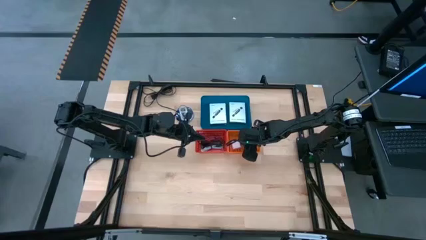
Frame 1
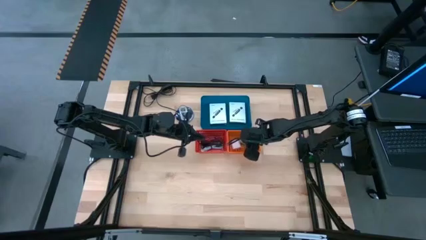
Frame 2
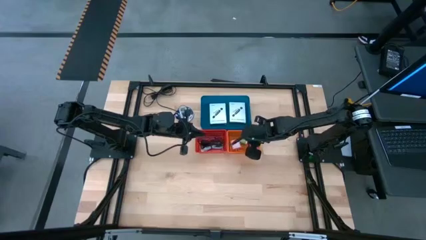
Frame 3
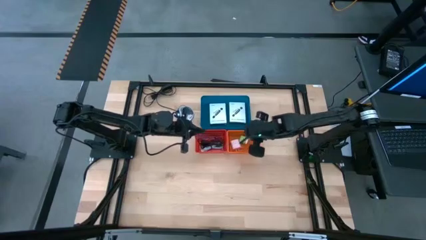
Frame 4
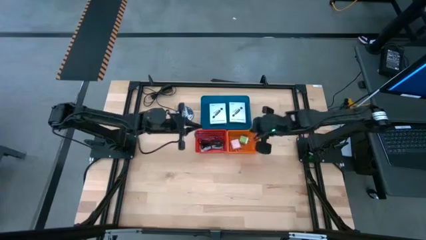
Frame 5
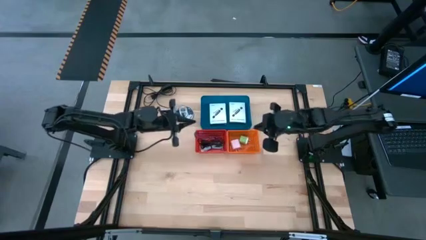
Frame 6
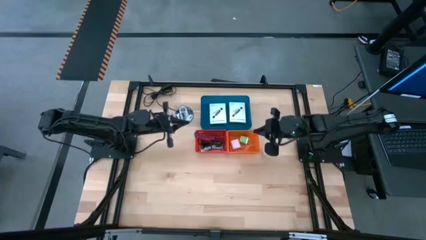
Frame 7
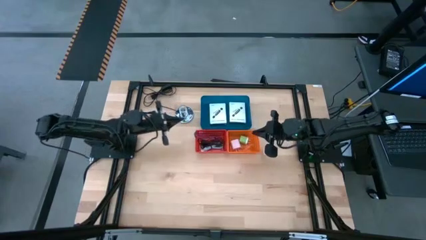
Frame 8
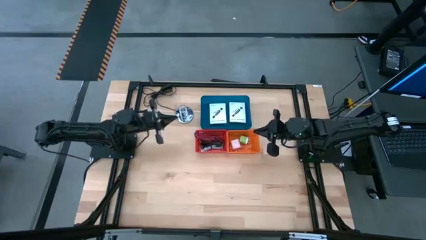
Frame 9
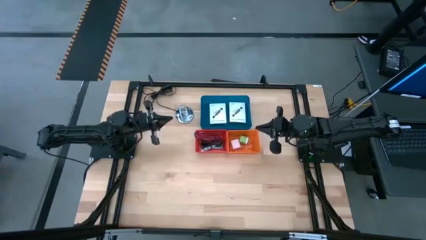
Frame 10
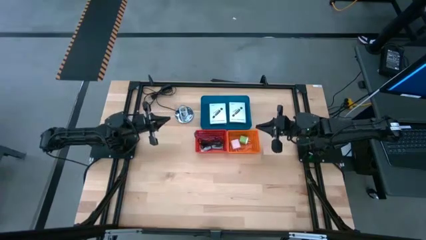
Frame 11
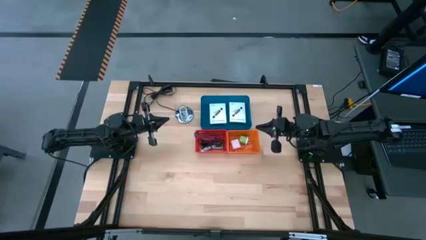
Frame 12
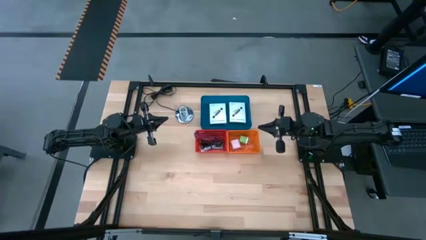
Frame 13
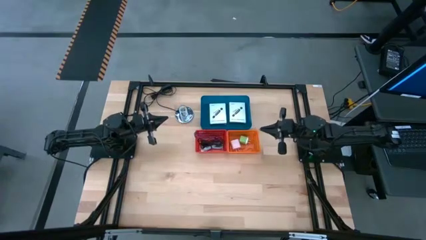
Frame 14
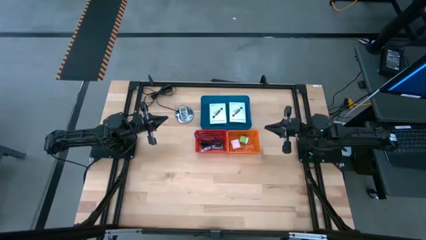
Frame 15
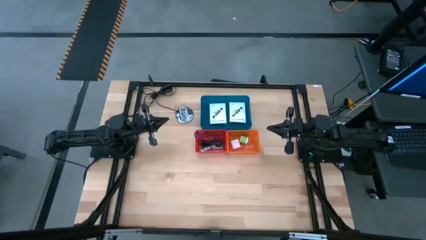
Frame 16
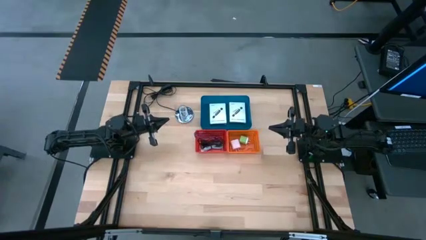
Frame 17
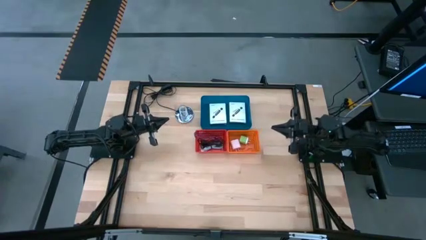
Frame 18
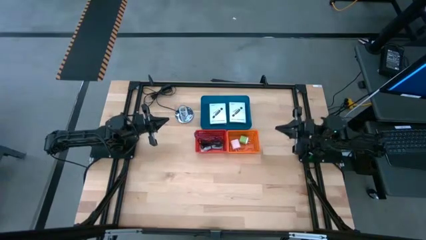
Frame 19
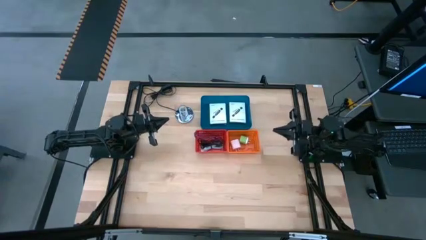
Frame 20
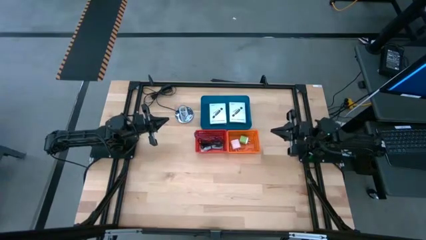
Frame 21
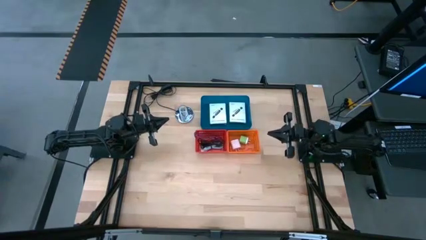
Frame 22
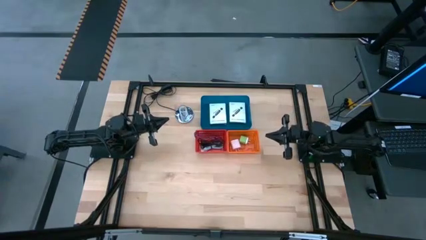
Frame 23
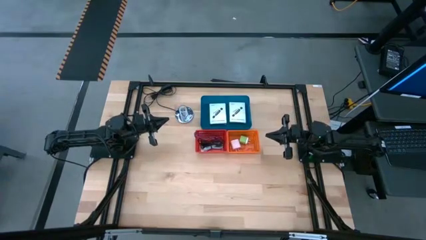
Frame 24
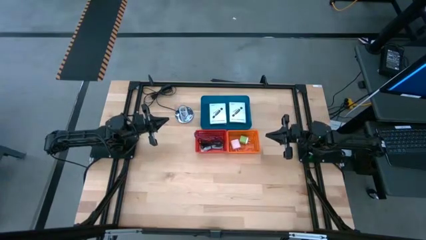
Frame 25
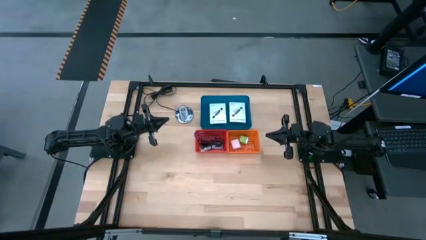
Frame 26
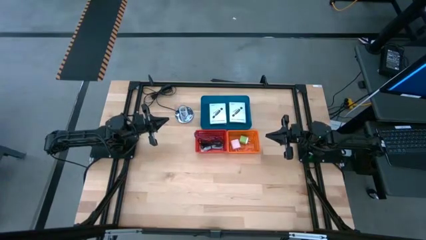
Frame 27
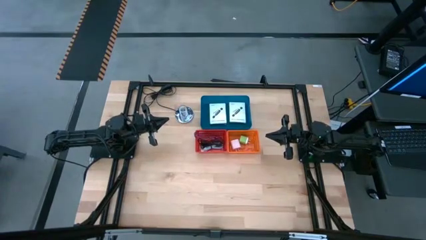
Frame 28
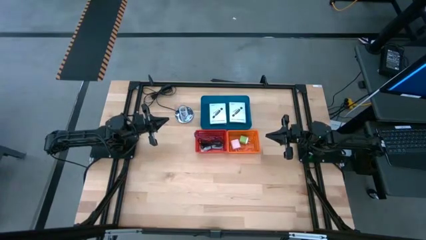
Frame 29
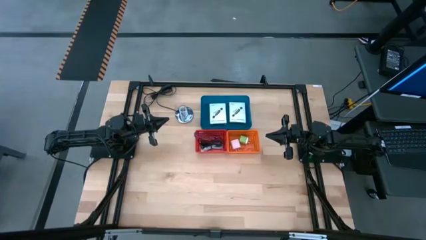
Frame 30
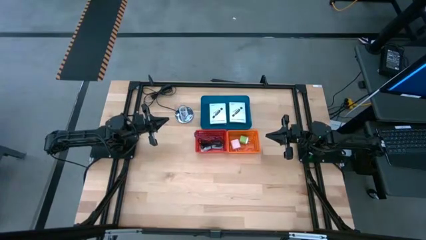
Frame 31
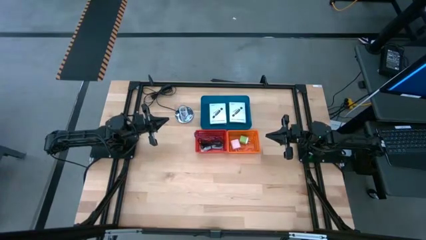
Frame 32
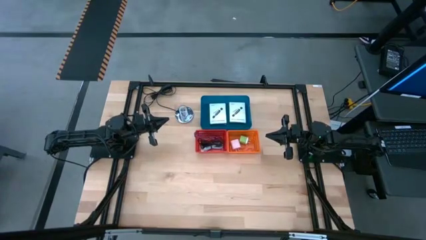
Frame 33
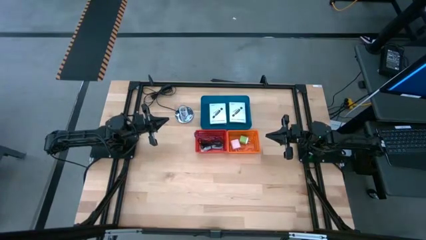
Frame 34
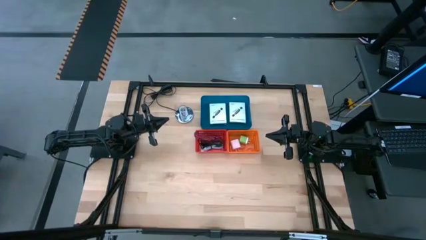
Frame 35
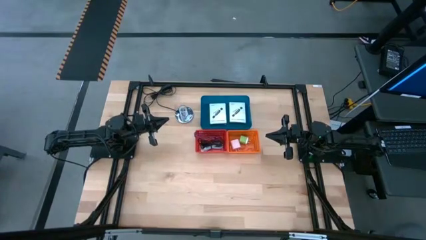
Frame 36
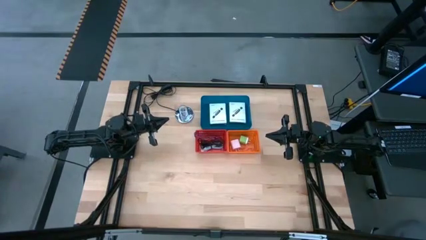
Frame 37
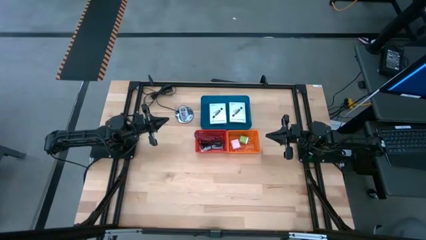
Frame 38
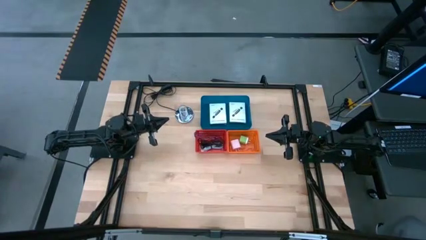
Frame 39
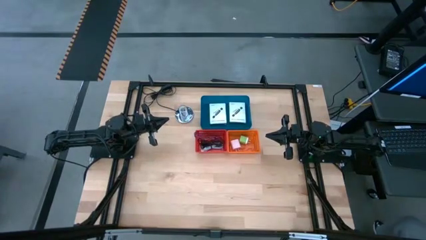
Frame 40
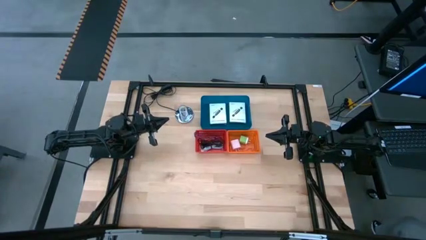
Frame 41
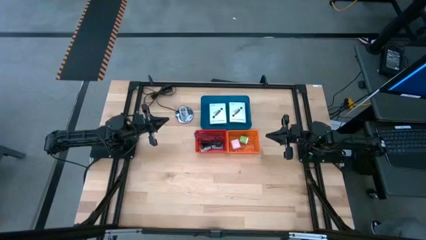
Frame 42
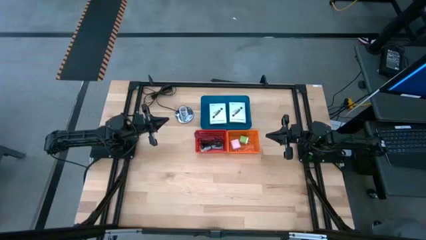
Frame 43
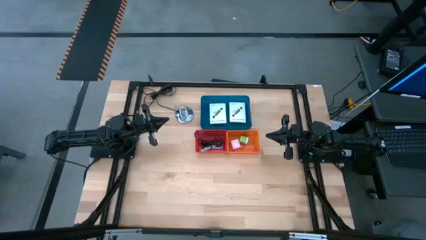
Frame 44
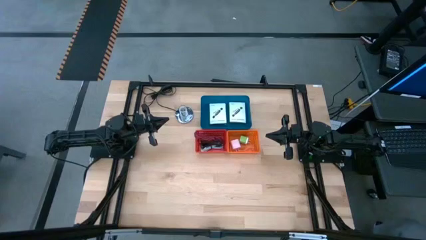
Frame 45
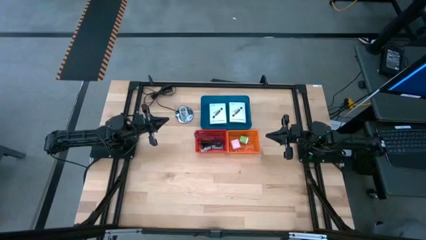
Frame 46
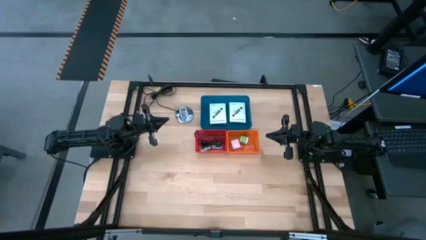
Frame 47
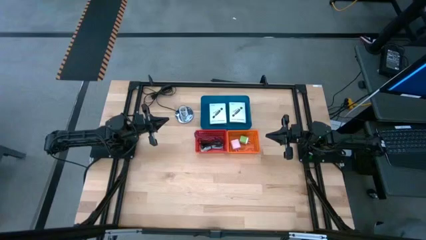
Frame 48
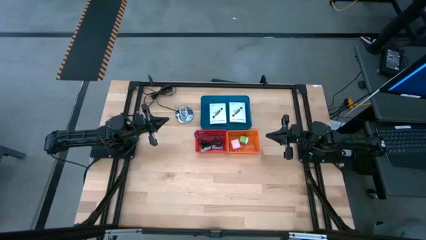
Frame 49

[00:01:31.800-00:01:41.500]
Task: Pick and place items into bin
Return to Home Position

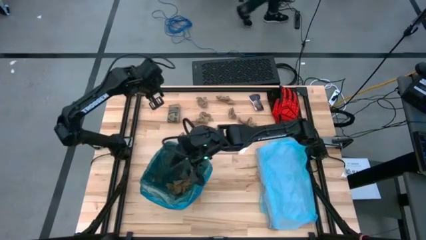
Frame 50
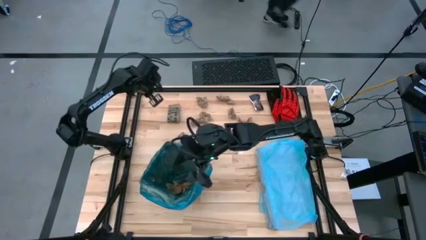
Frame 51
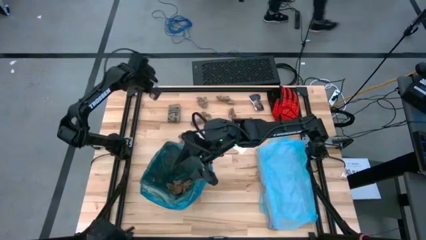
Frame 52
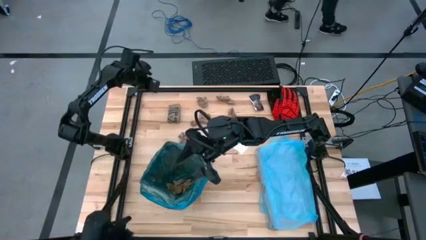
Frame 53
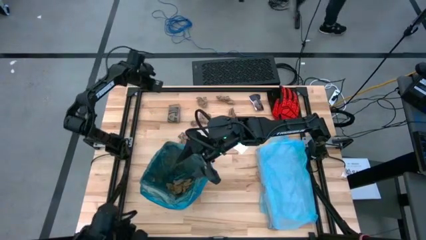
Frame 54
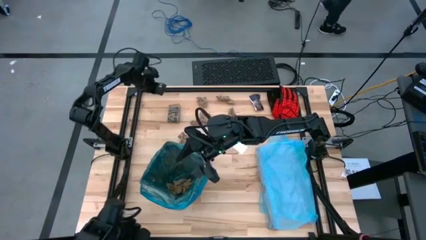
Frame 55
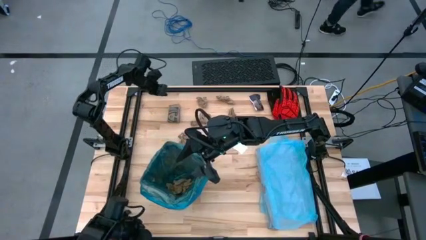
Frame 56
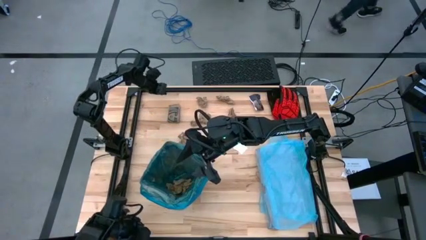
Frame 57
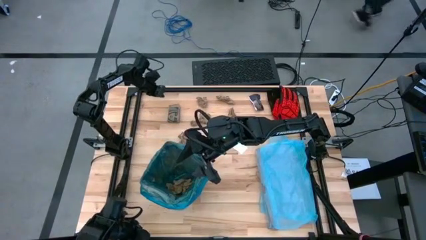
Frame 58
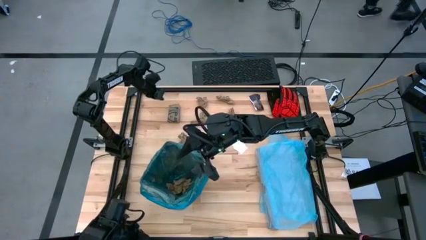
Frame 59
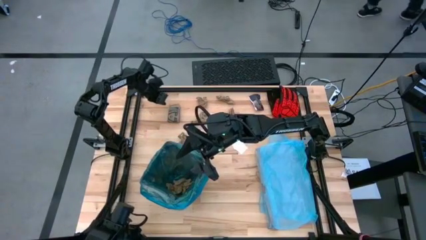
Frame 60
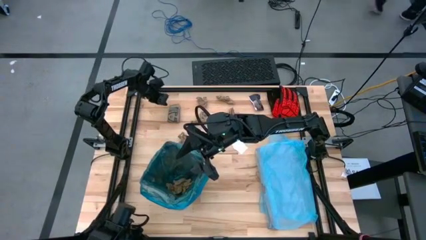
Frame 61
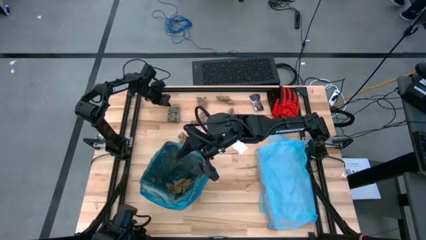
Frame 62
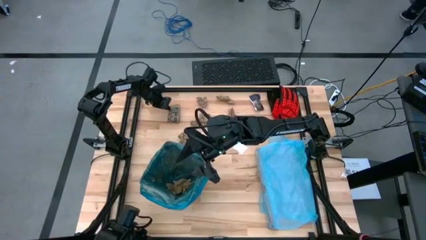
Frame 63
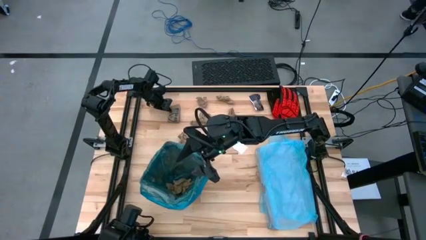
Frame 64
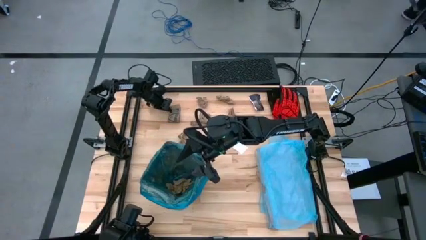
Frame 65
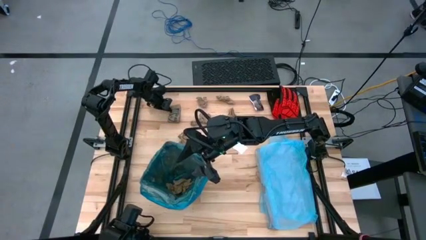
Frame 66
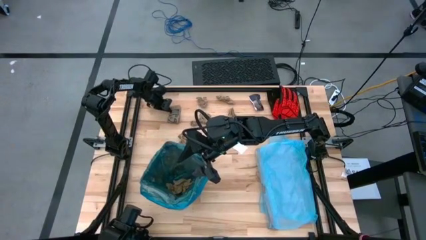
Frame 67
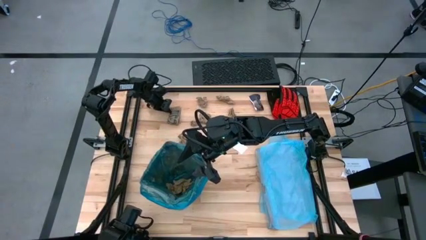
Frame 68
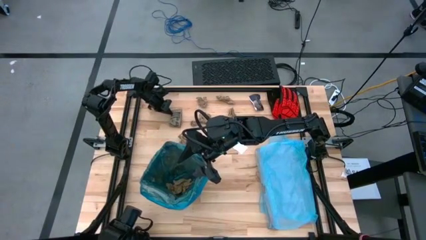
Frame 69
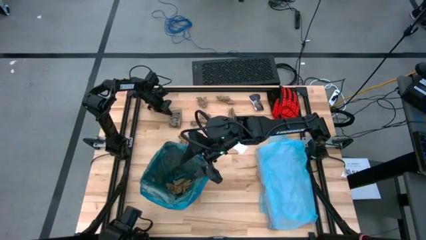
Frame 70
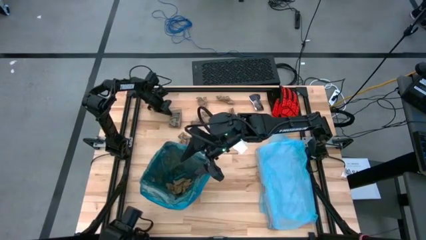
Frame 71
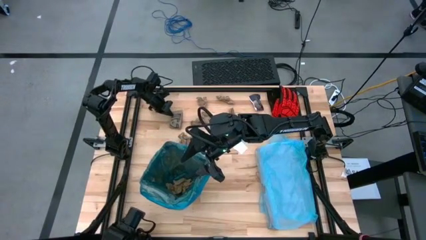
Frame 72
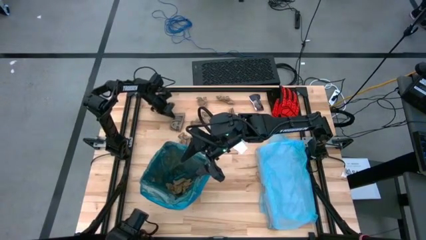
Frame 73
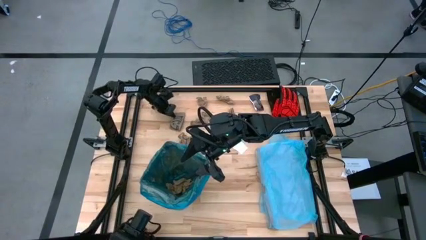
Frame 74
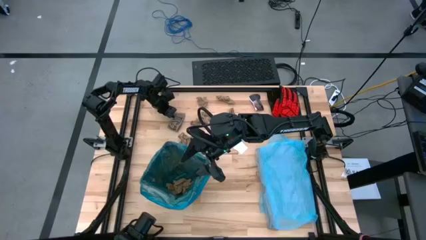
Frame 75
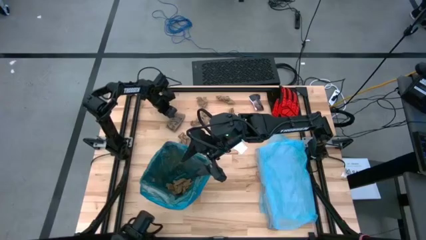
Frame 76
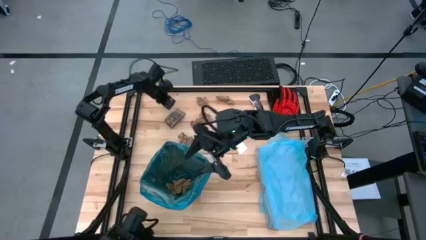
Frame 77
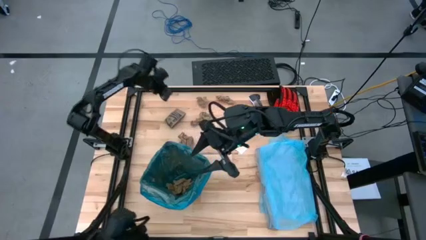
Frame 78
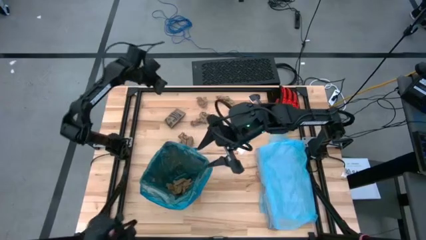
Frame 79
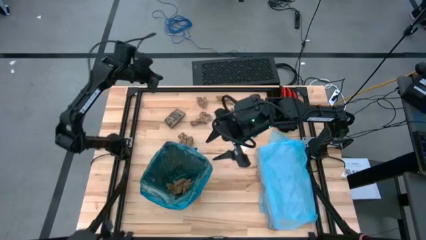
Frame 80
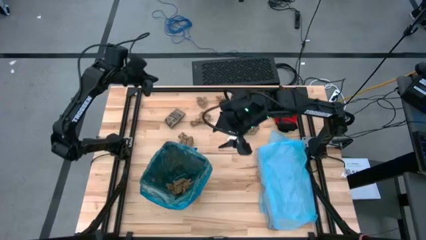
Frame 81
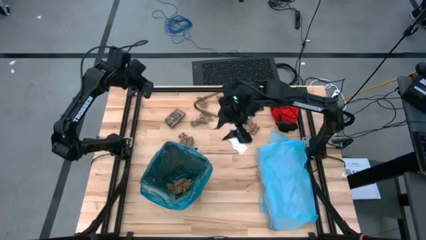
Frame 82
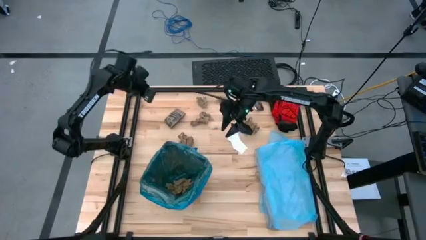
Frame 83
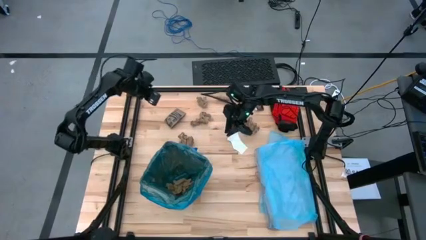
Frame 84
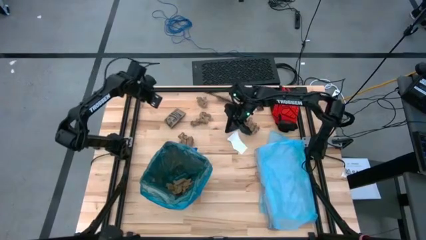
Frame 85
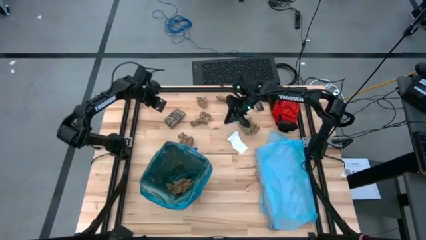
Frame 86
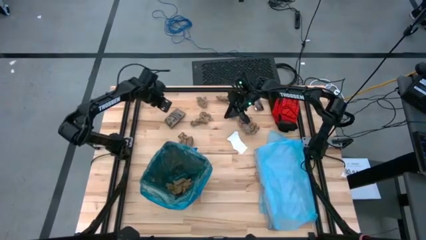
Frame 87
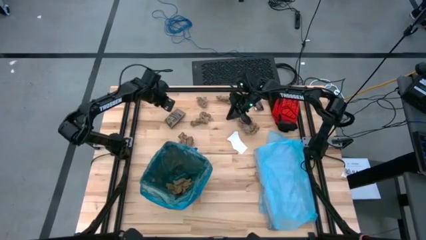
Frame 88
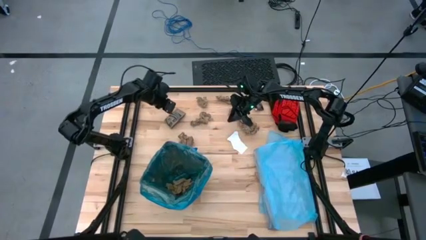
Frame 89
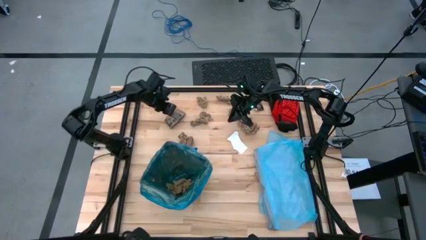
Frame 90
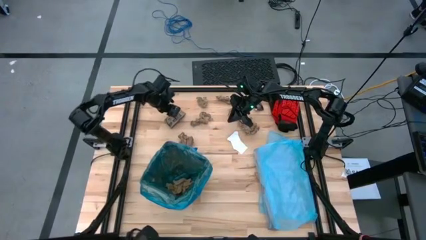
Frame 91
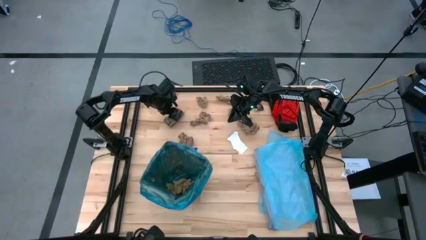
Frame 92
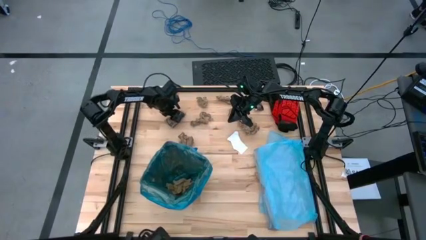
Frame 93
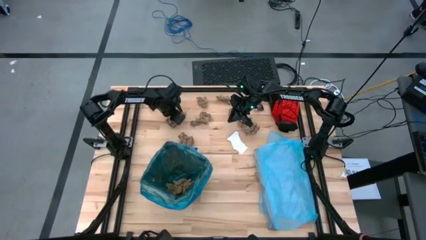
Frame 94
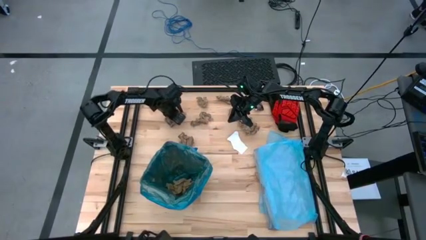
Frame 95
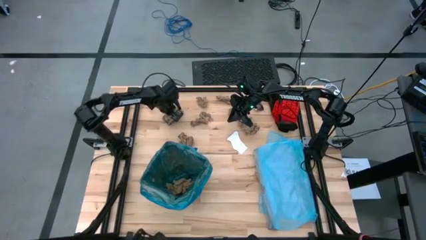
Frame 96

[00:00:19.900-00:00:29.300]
Task: place trash/remove bag and relplace
Put the cardboard piece into the trash bin
